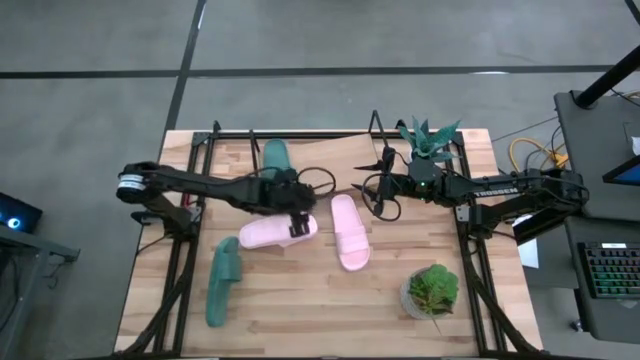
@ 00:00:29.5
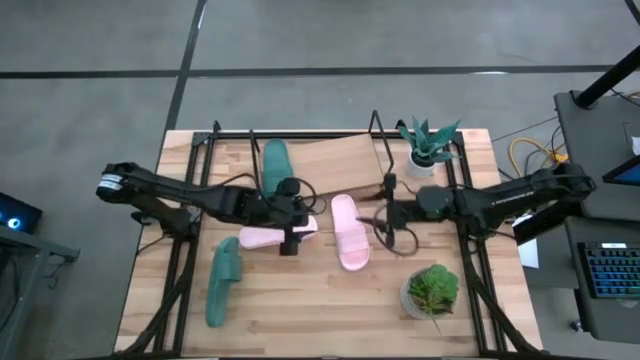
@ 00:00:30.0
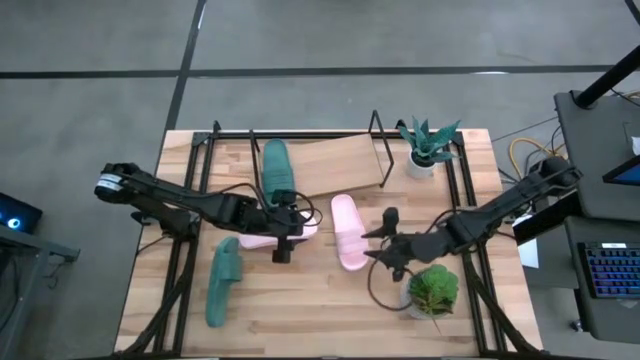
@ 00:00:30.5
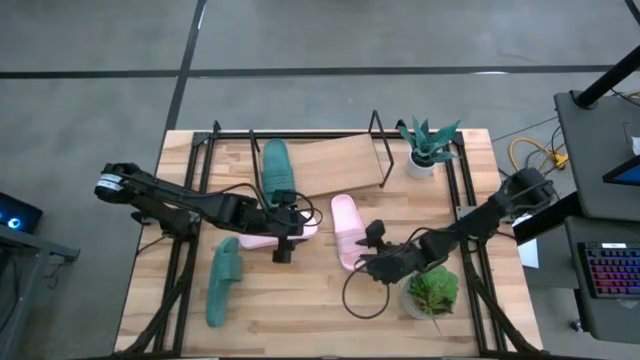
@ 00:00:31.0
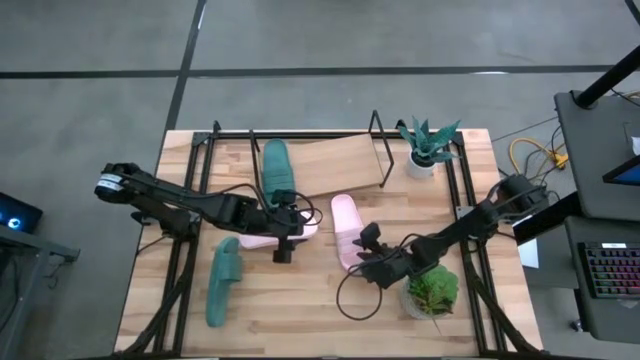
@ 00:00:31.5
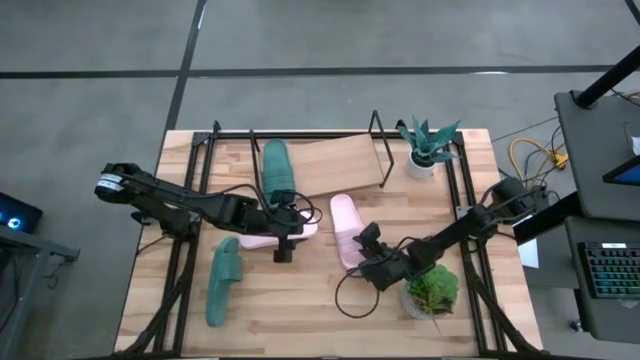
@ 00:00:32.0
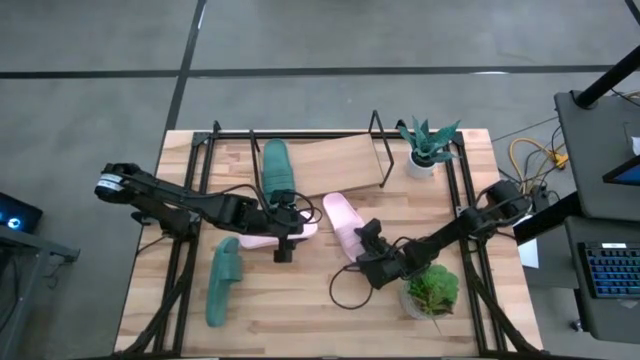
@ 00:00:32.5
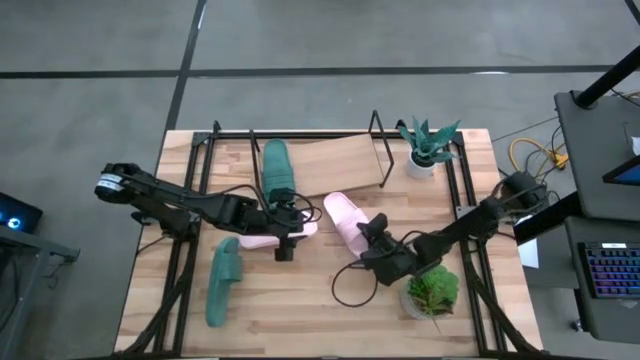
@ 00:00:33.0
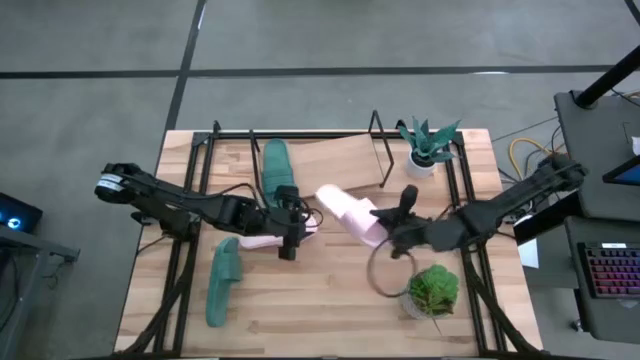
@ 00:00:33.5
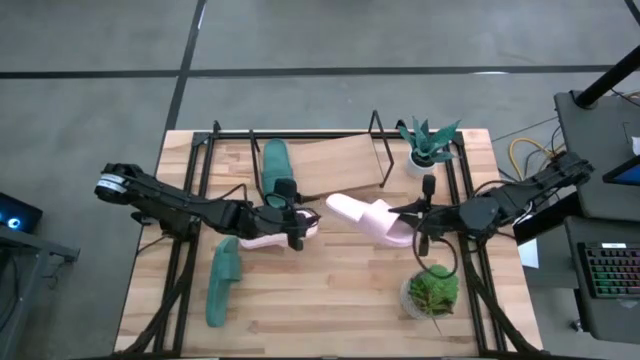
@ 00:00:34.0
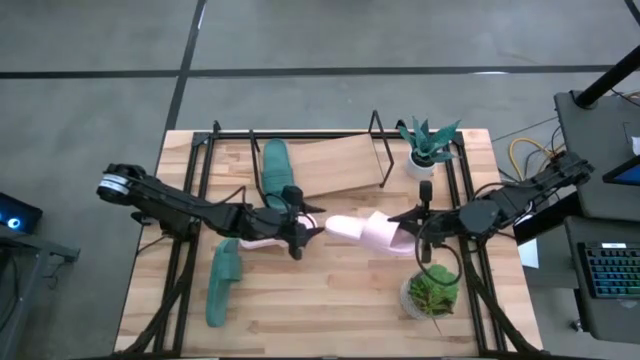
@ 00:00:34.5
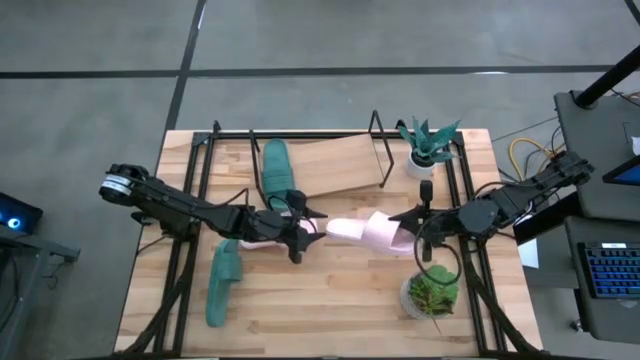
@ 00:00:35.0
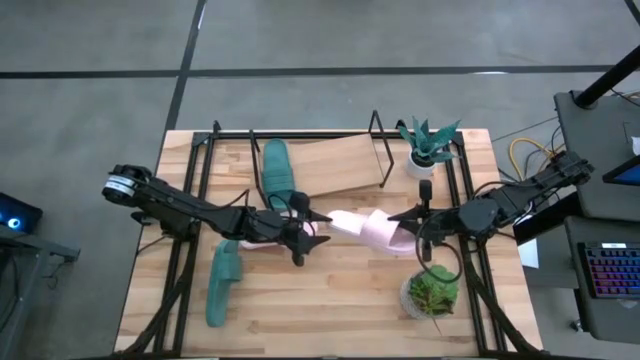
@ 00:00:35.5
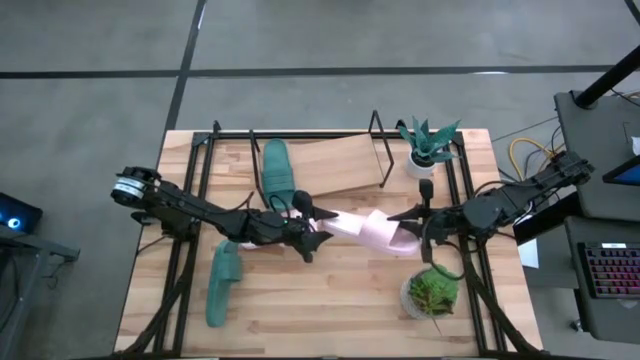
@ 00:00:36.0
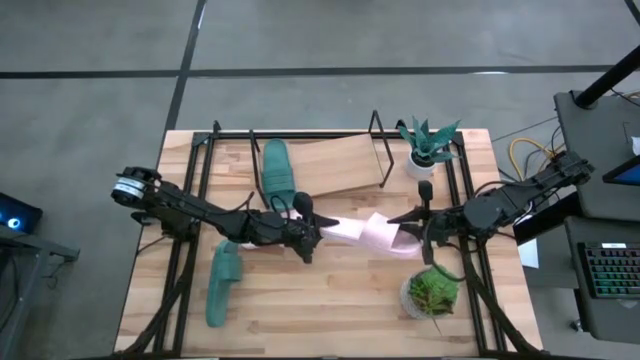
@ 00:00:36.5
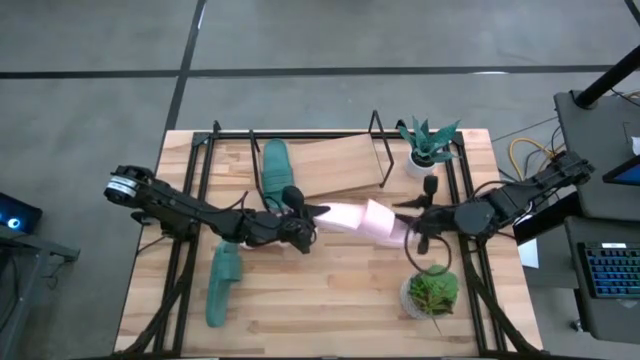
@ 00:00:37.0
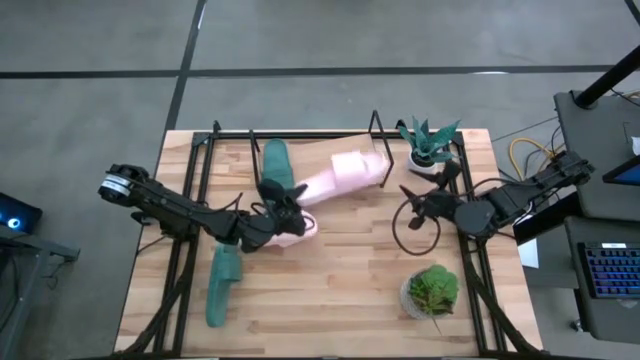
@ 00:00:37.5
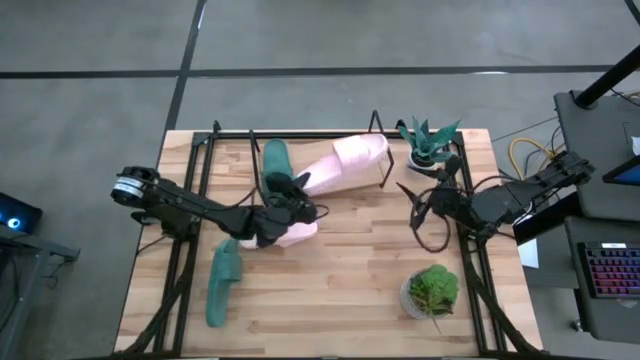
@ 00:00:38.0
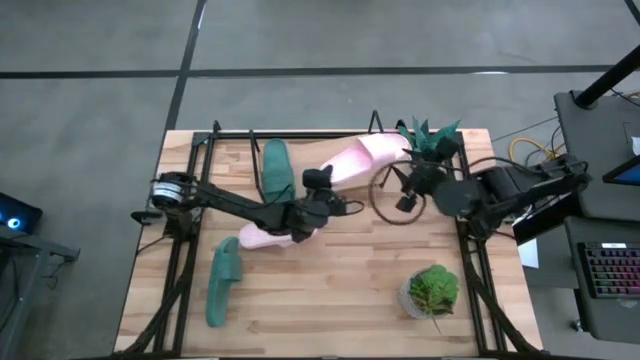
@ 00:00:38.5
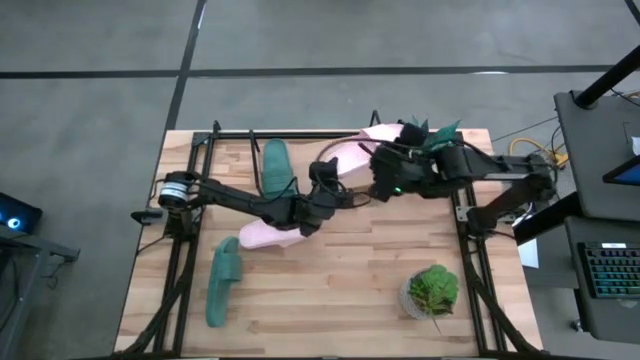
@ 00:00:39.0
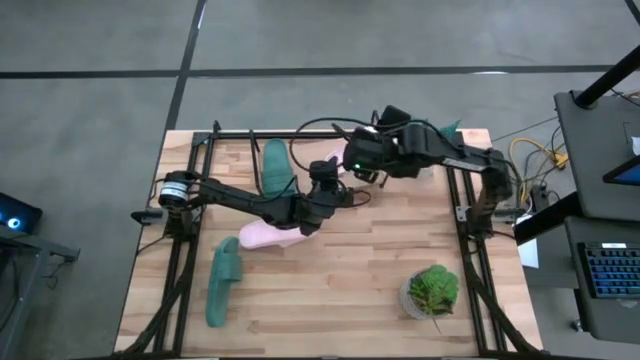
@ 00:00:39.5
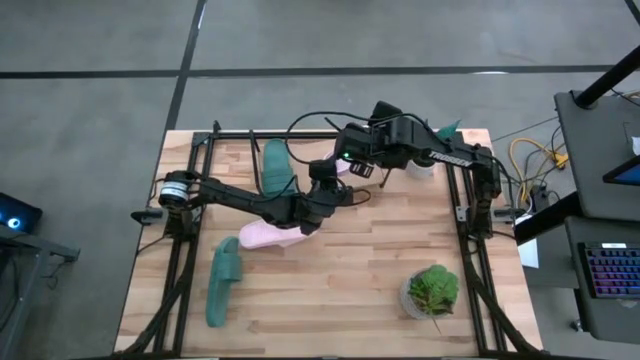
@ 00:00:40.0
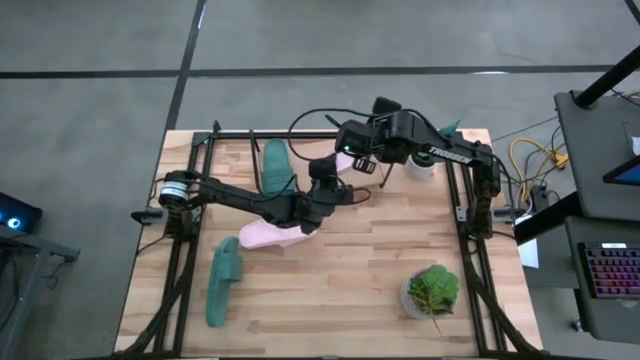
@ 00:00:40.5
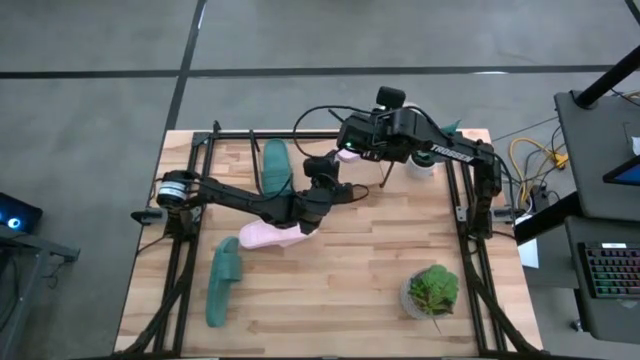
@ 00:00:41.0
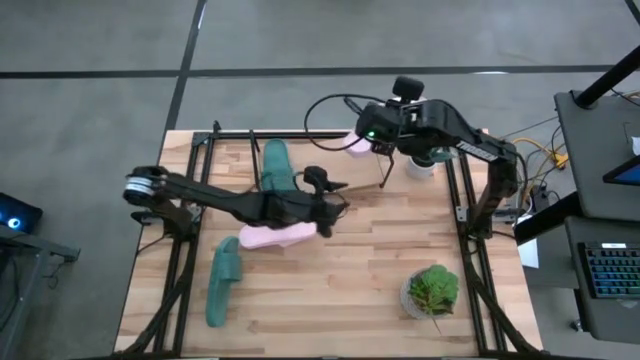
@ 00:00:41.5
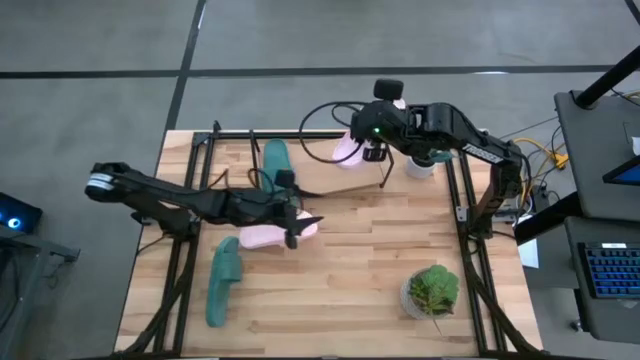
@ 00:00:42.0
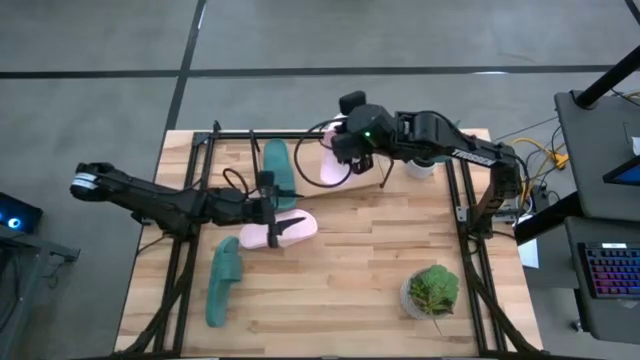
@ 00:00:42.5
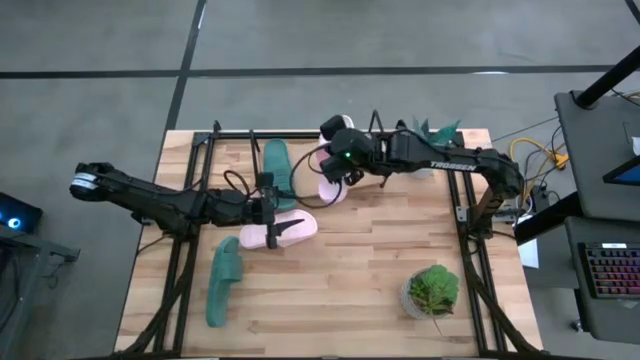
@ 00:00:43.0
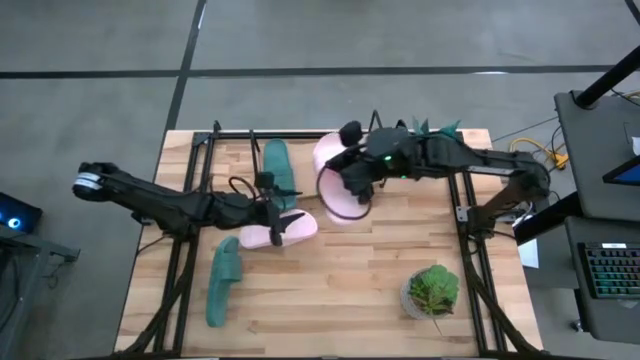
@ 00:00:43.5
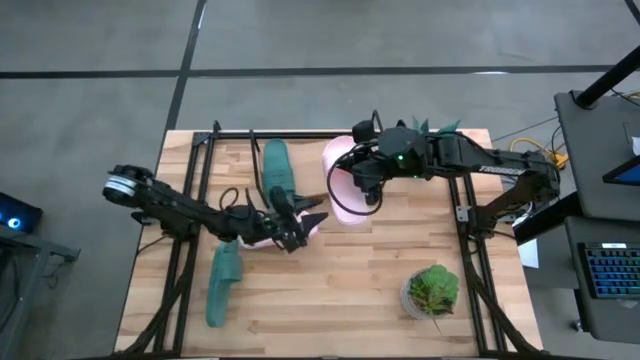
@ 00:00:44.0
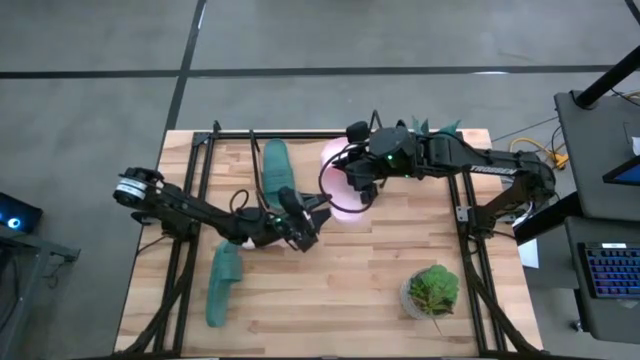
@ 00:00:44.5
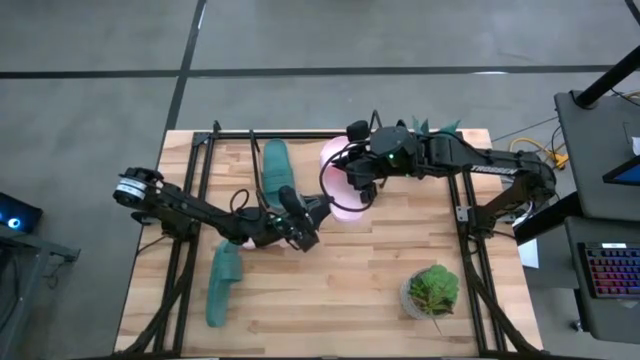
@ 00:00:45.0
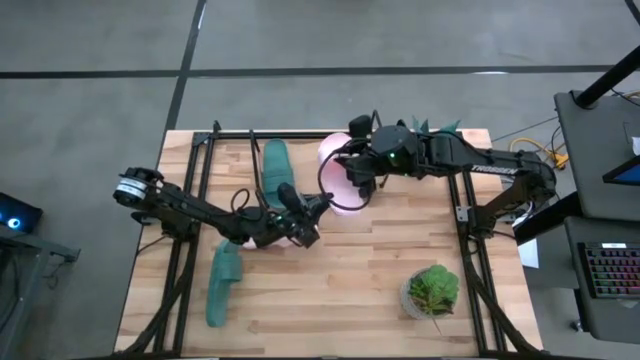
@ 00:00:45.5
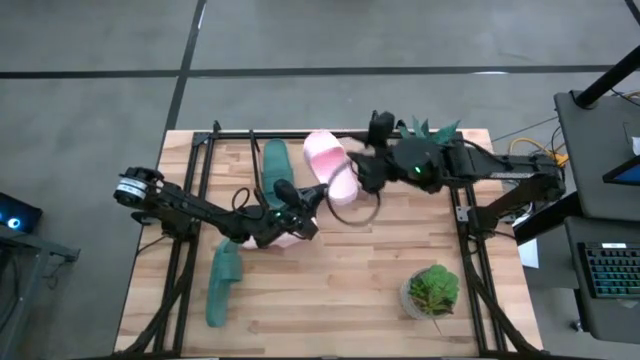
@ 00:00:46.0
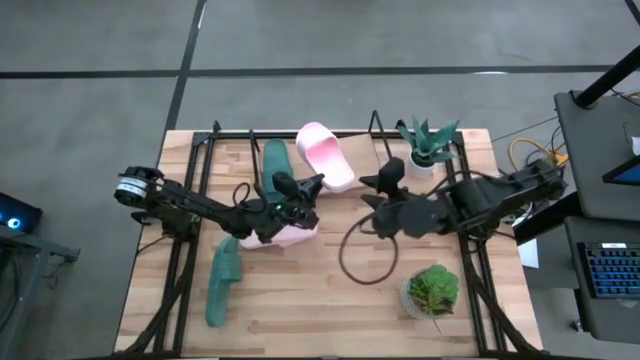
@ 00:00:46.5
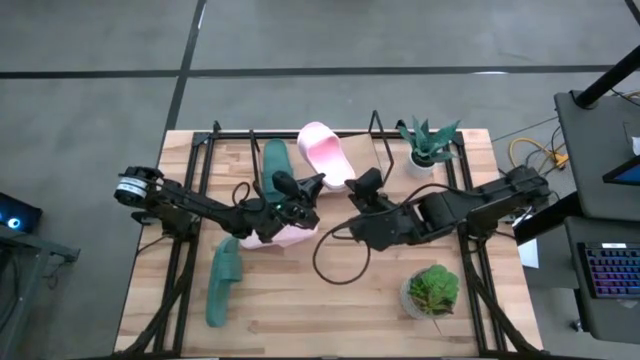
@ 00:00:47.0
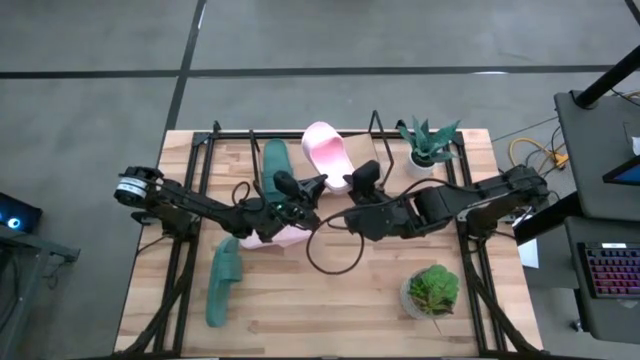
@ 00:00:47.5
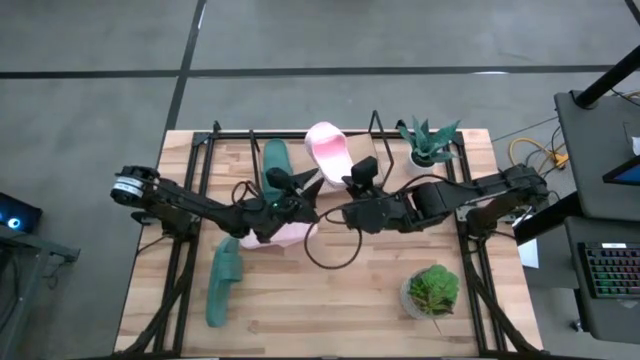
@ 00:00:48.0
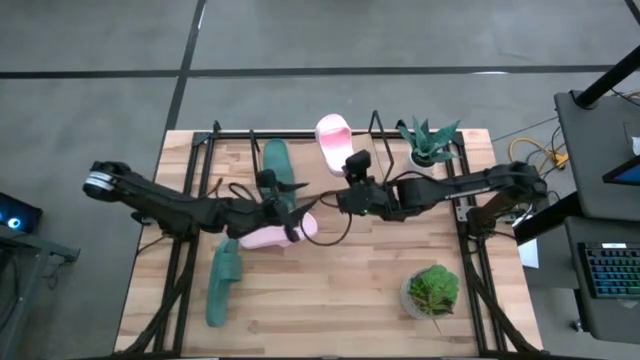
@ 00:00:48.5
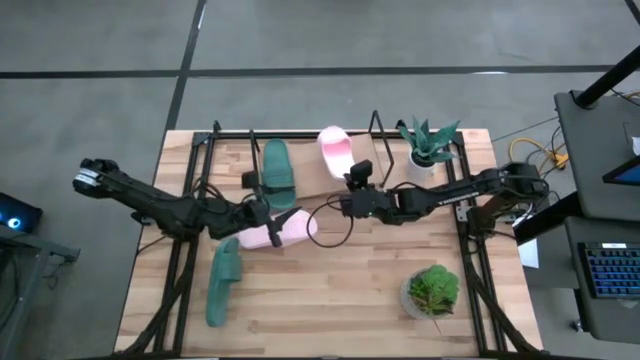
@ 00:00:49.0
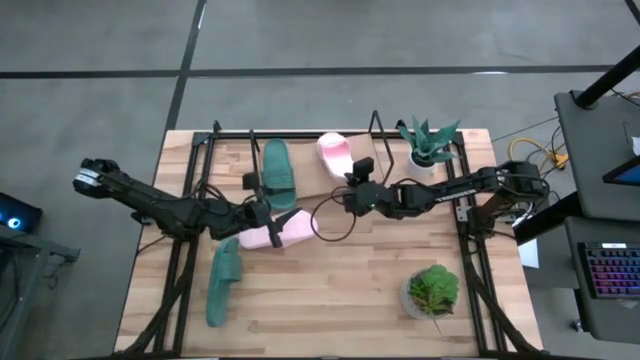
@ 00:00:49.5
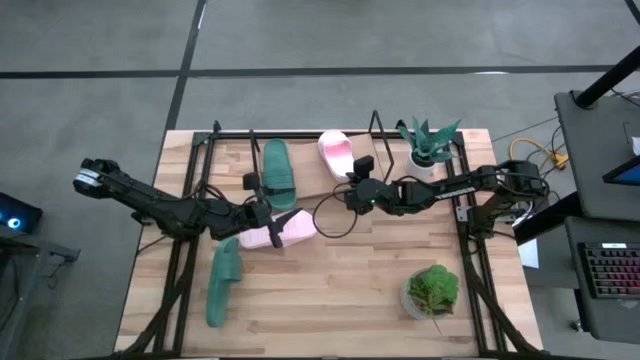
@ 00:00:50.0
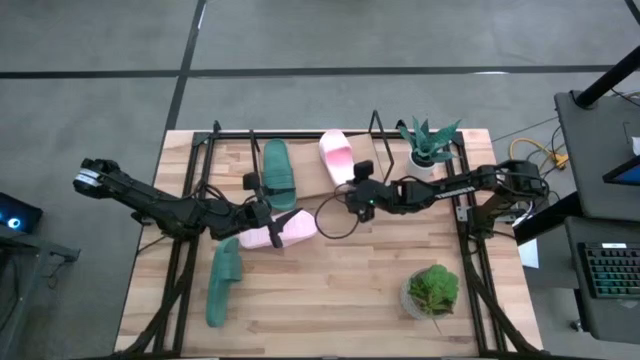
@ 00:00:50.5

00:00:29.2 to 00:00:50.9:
Task: Pick and place slides into the shelf
Put the right pink slide on the shelf
